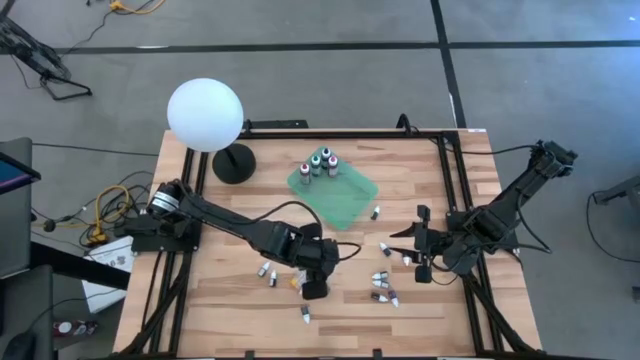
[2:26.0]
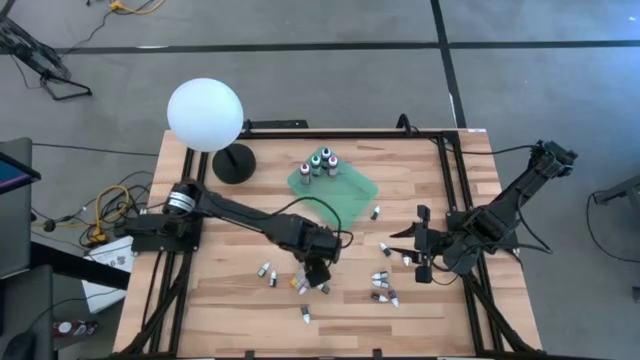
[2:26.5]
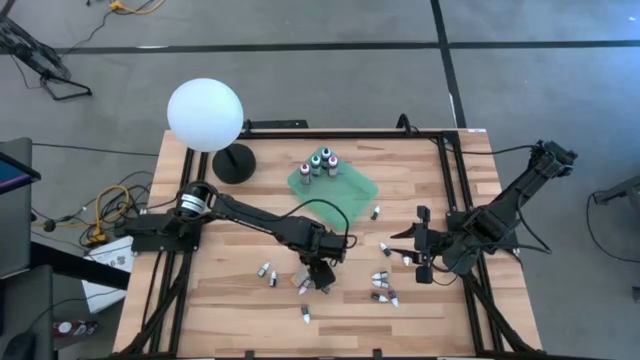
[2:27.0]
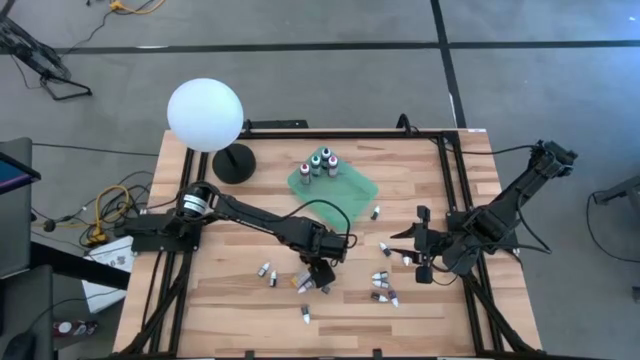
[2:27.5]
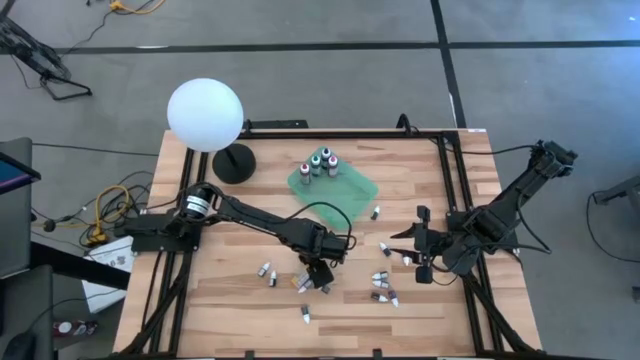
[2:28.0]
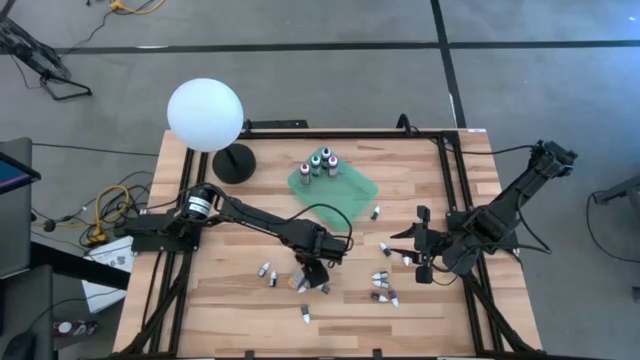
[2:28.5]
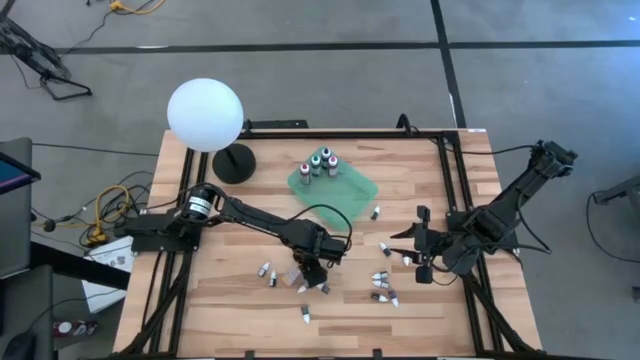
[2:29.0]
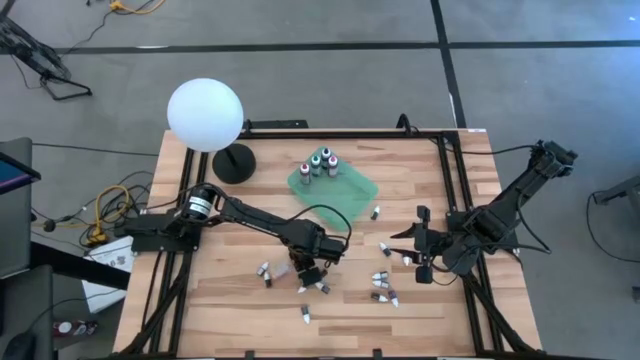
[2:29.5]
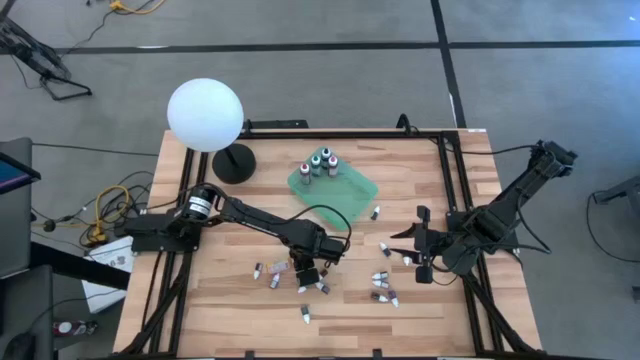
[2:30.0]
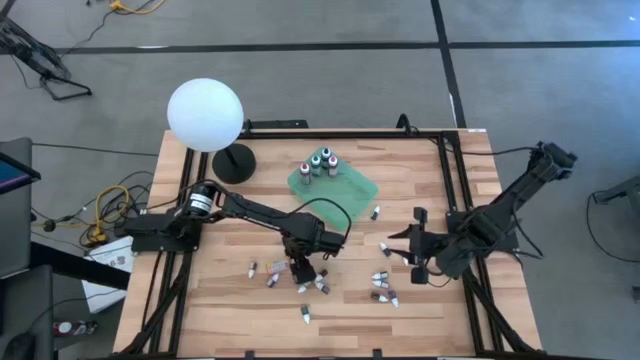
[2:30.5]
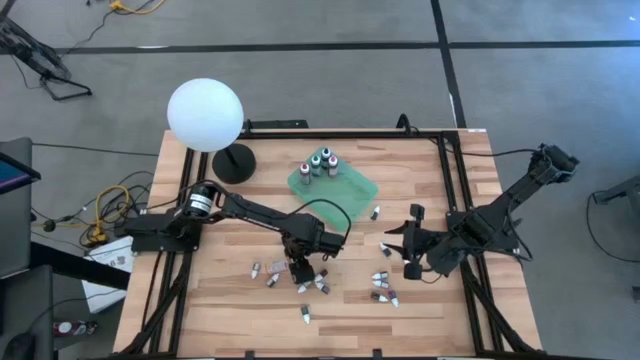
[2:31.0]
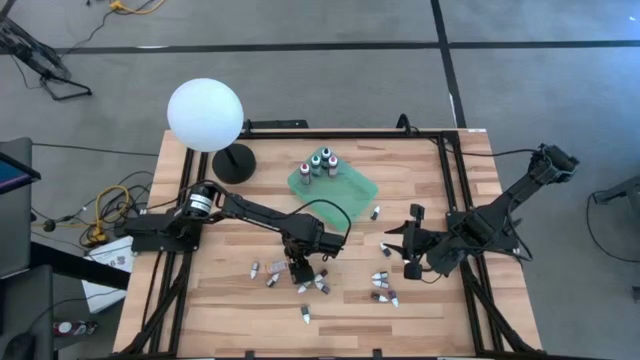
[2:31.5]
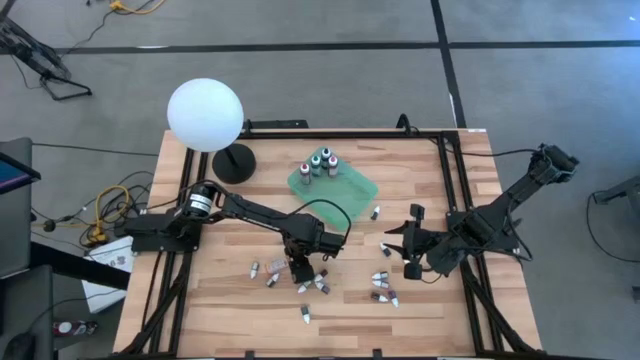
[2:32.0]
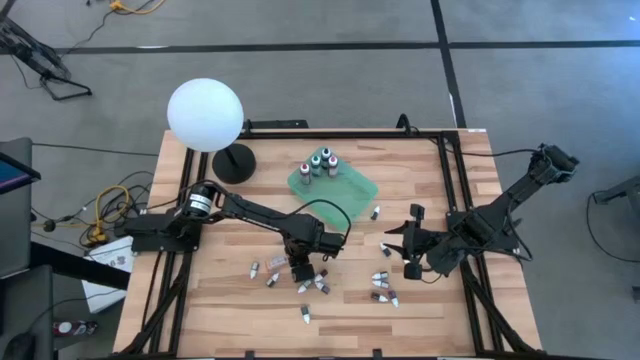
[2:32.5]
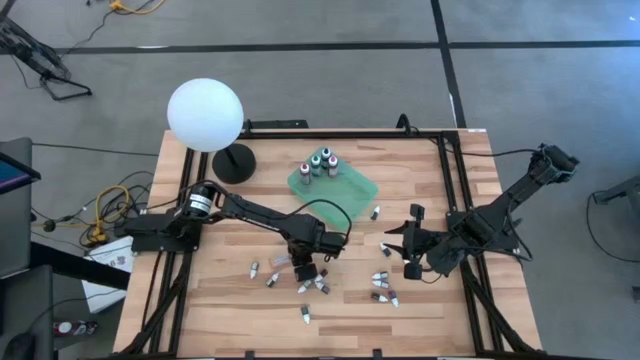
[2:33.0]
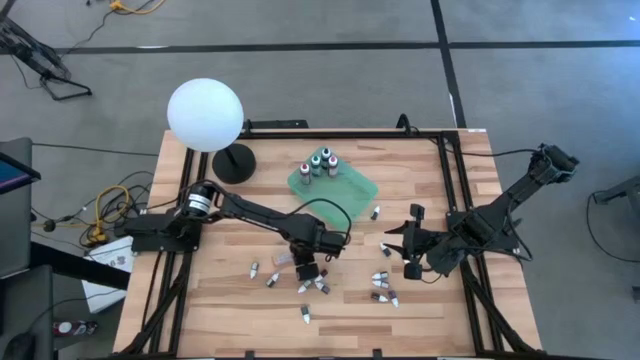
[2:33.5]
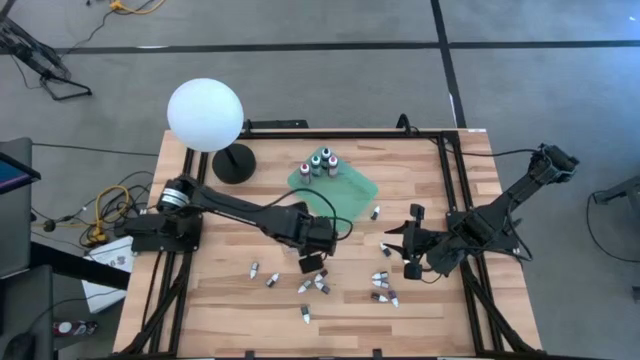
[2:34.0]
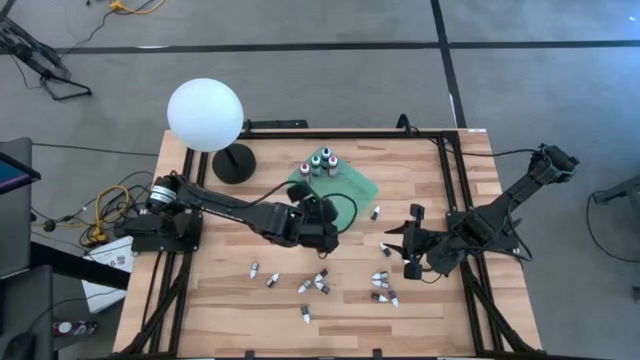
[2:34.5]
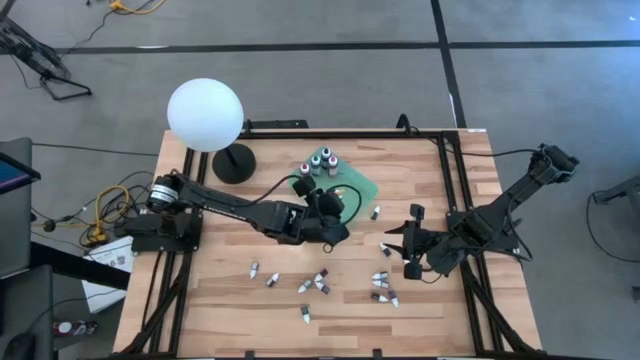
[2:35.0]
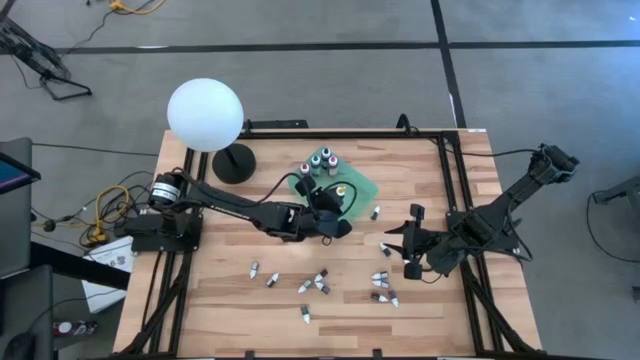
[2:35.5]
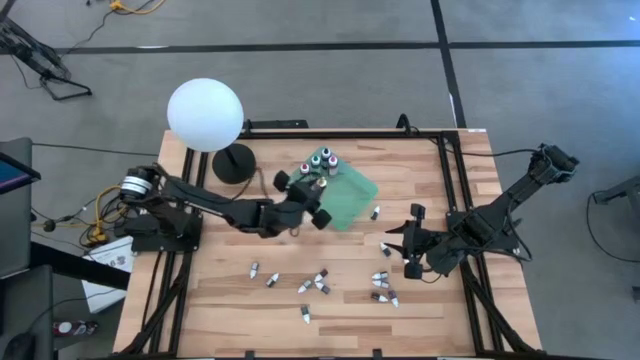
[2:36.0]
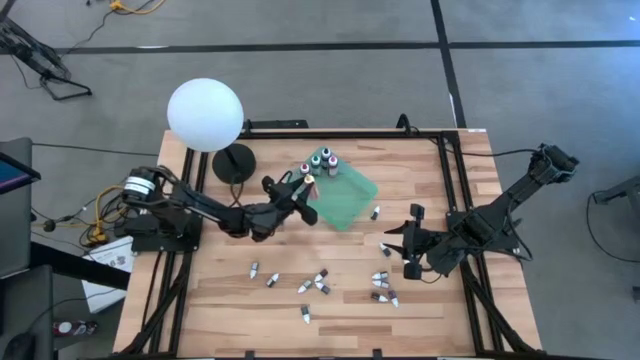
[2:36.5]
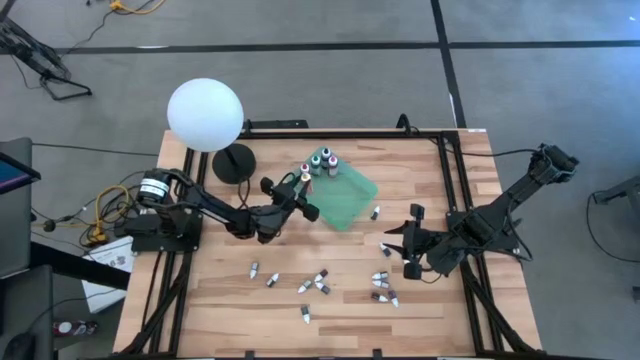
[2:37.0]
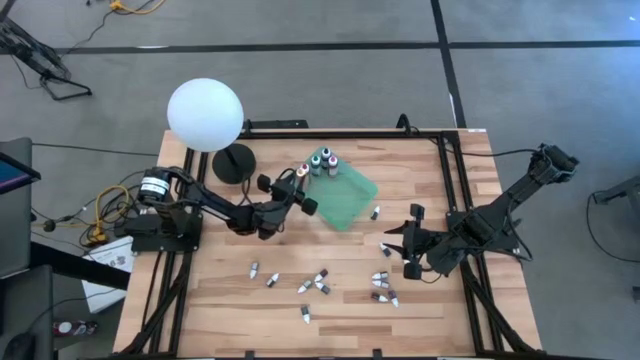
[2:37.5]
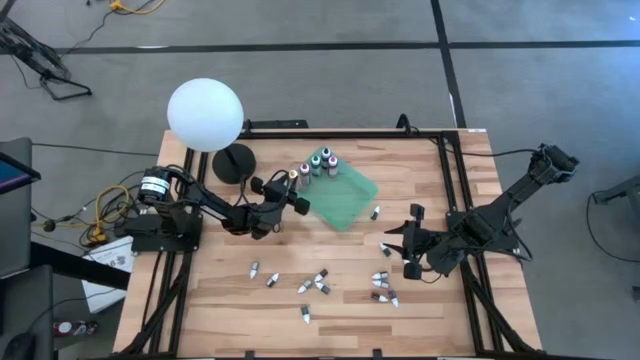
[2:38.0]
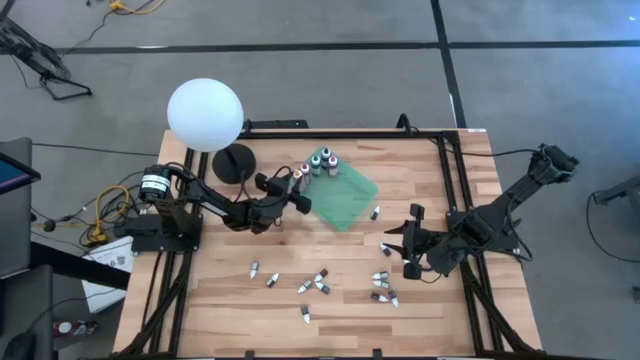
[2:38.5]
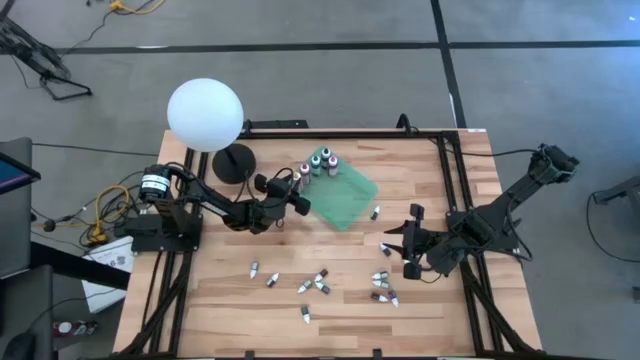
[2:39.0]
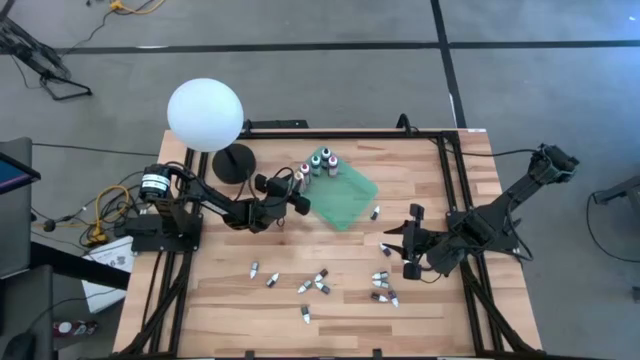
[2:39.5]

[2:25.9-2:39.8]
Task: Pick & Place food coloring
Put the yellow food coloring bottle into the green bin

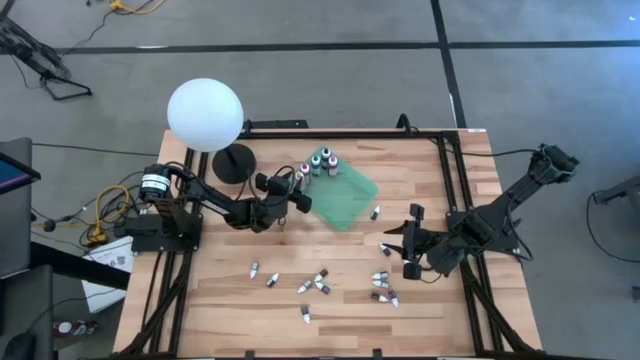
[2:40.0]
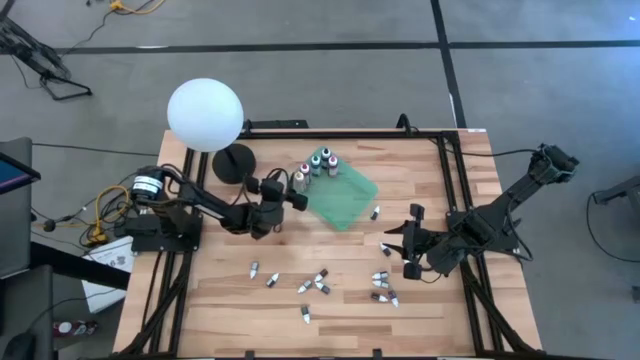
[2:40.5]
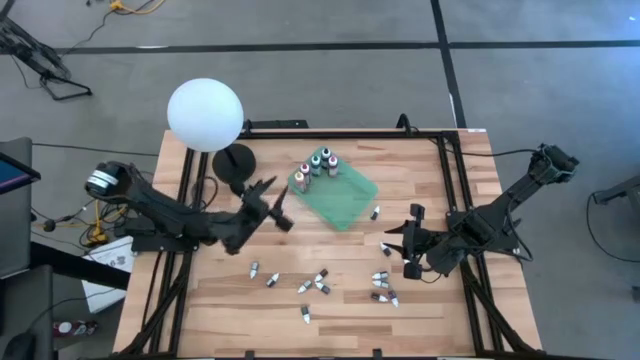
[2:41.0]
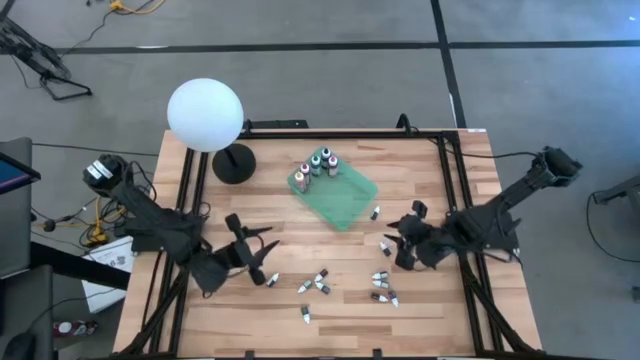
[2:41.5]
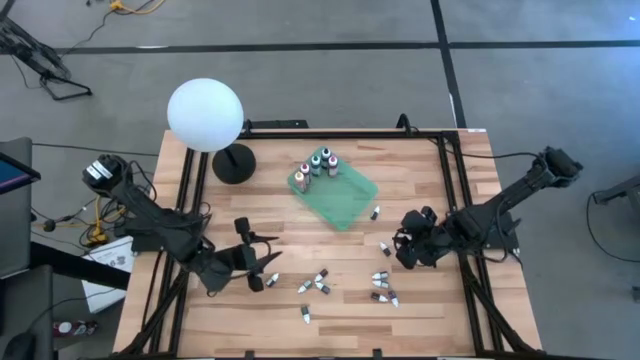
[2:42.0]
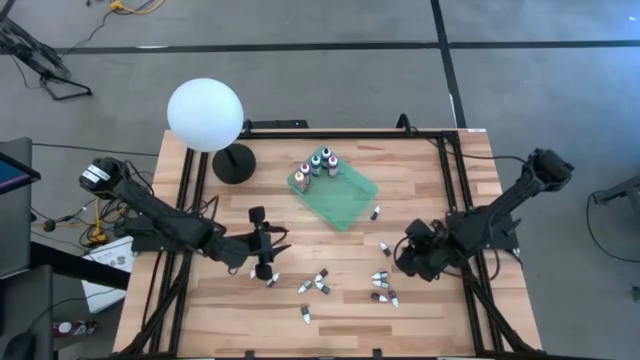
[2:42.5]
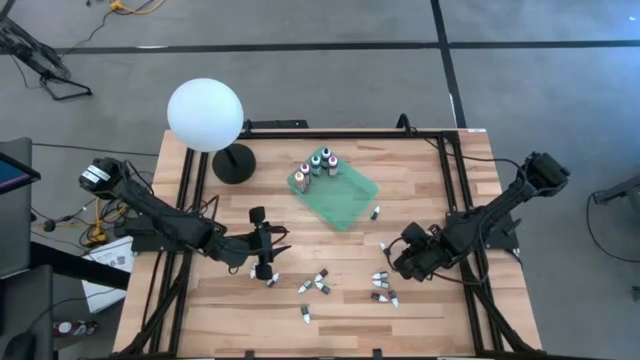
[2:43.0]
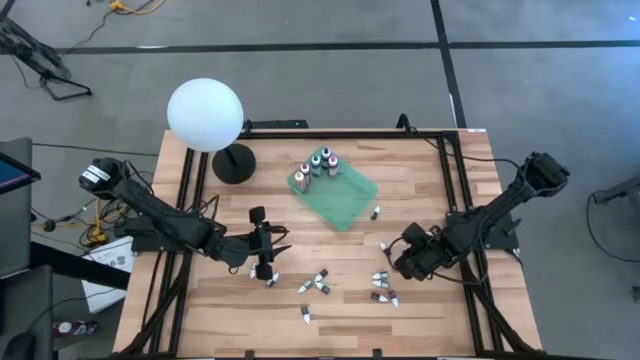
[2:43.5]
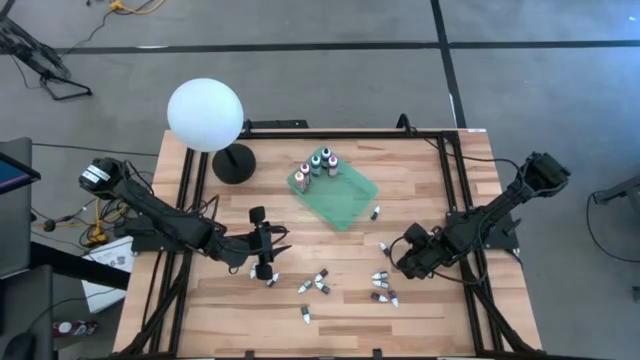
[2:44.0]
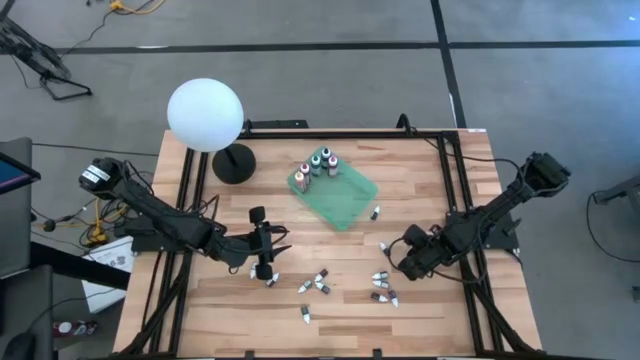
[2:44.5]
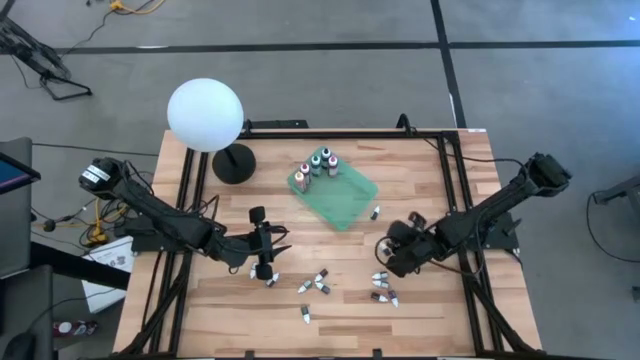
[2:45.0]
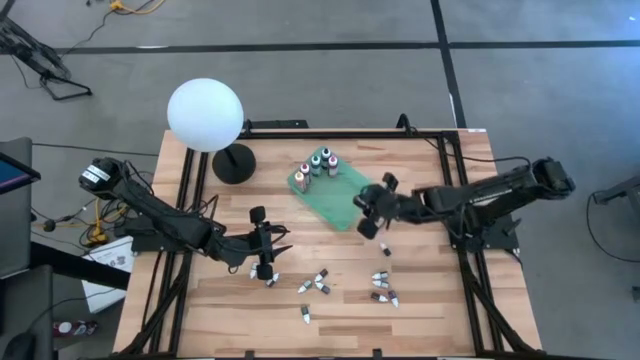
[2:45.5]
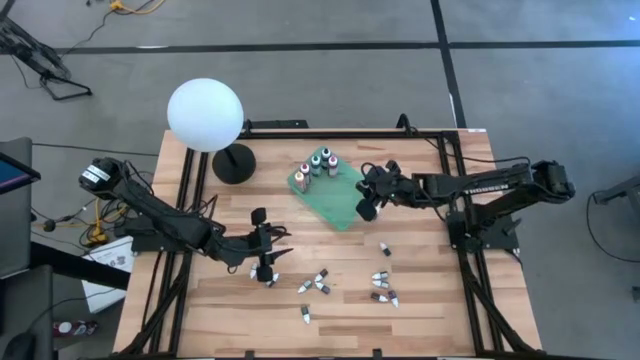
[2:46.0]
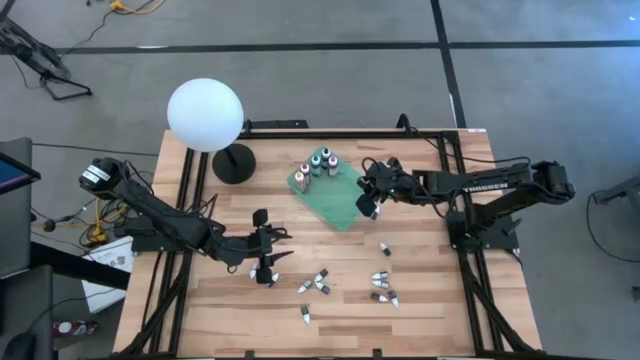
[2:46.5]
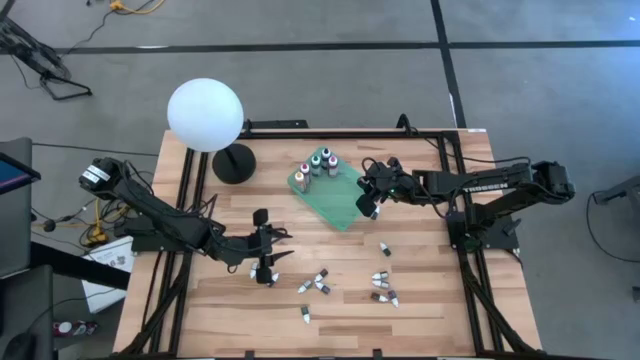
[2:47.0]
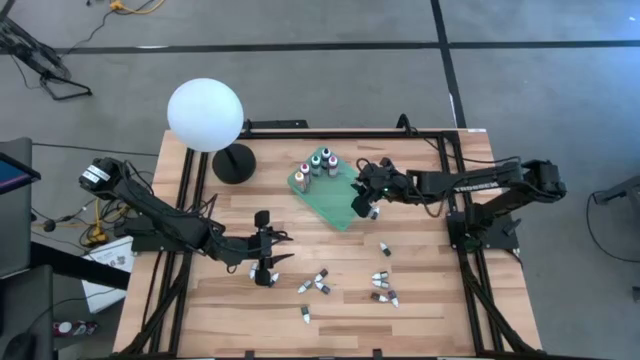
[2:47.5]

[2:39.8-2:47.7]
Put the small orange food coloring bottle into the green bin

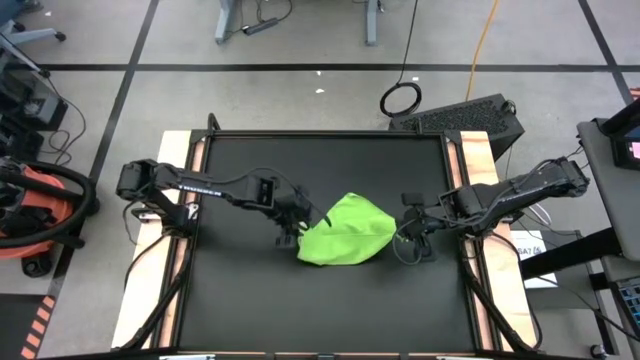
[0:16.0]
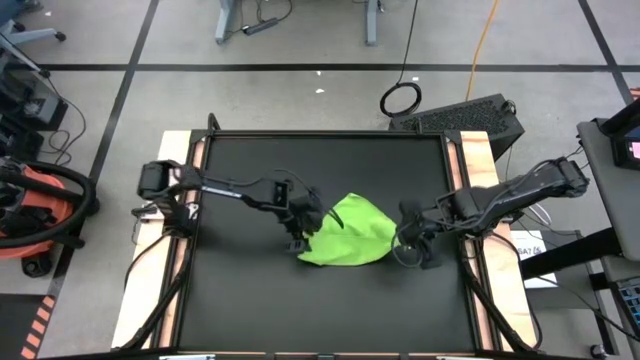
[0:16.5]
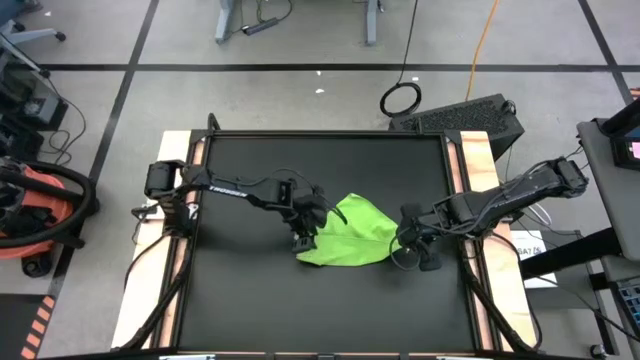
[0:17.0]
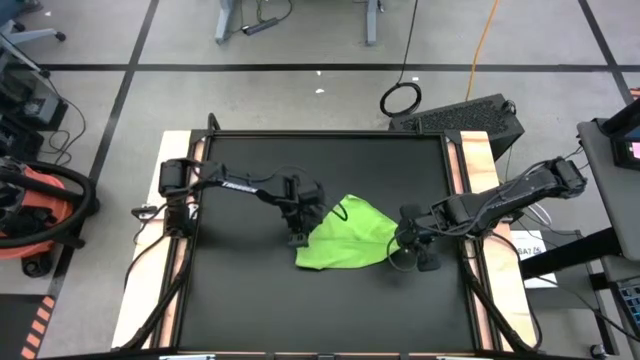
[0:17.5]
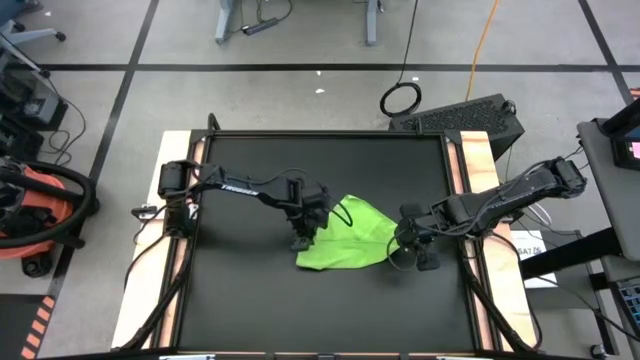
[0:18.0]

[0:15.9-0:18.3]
Task: Roll towel
Roll the green microfiber towel
